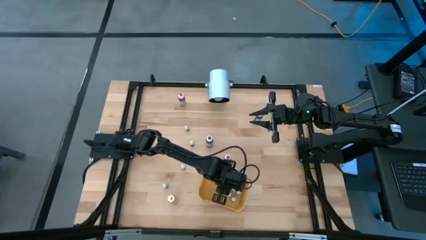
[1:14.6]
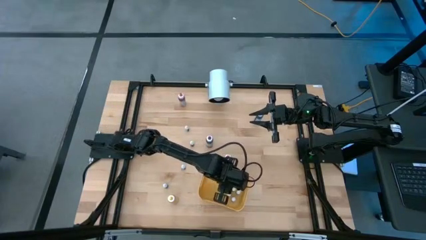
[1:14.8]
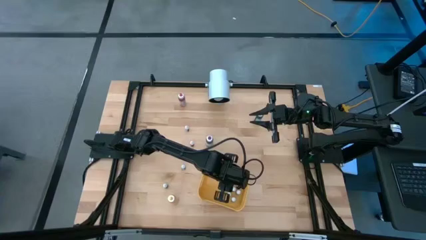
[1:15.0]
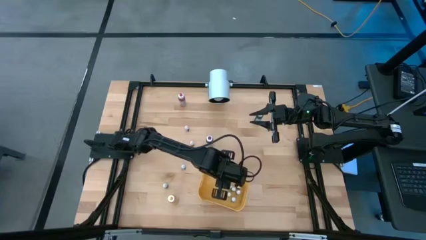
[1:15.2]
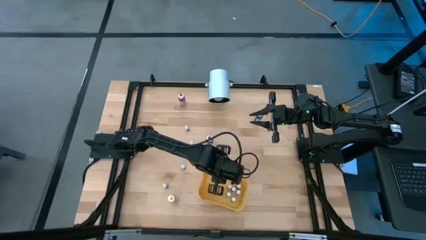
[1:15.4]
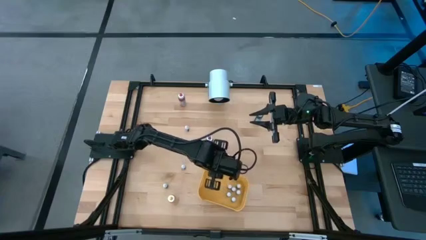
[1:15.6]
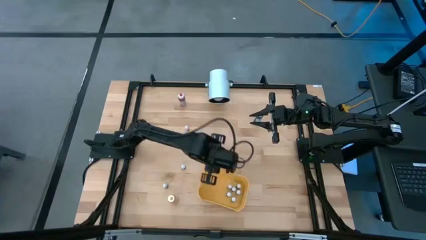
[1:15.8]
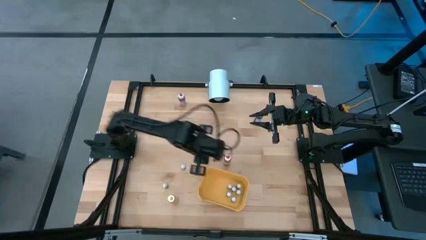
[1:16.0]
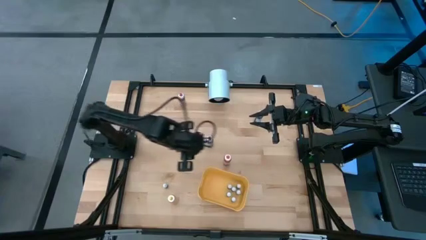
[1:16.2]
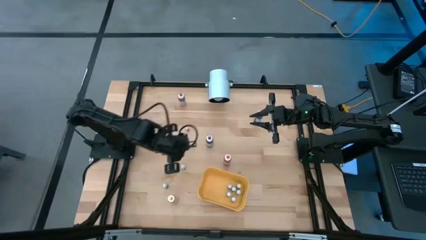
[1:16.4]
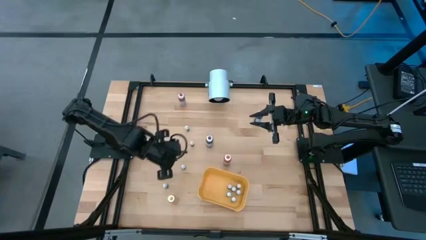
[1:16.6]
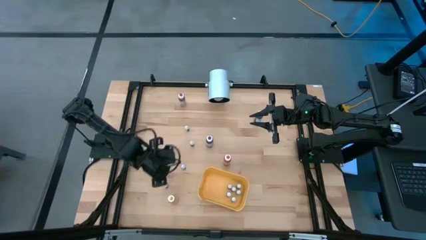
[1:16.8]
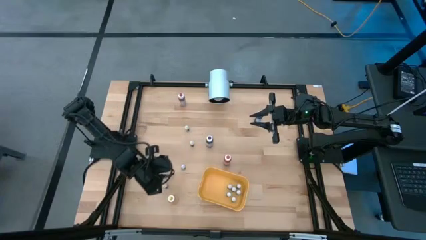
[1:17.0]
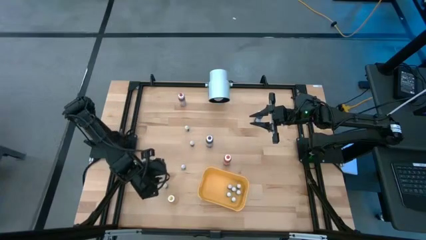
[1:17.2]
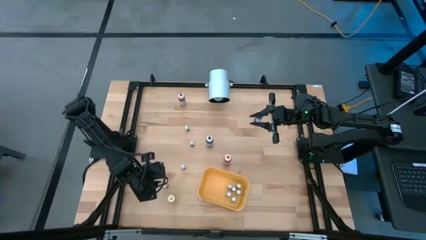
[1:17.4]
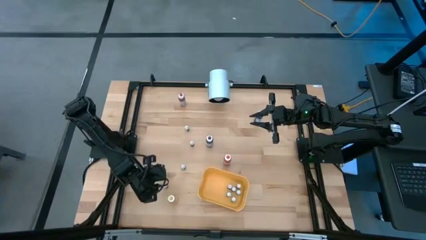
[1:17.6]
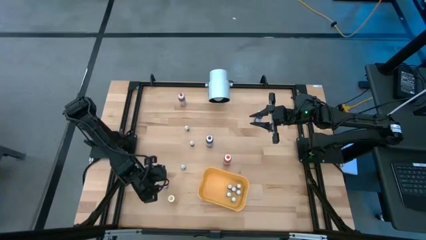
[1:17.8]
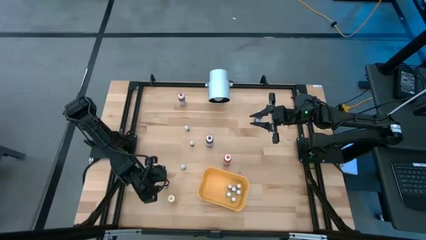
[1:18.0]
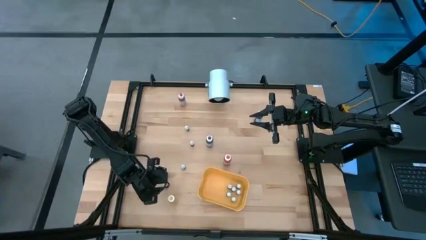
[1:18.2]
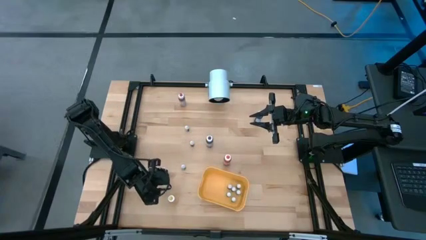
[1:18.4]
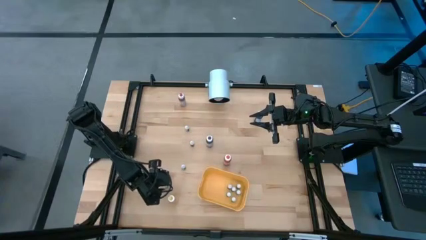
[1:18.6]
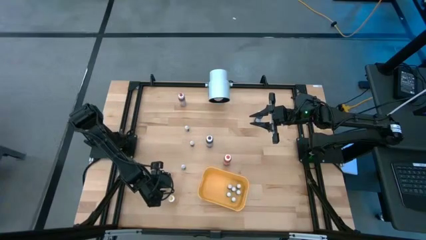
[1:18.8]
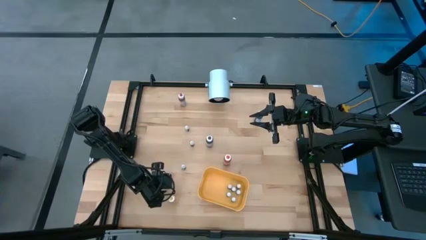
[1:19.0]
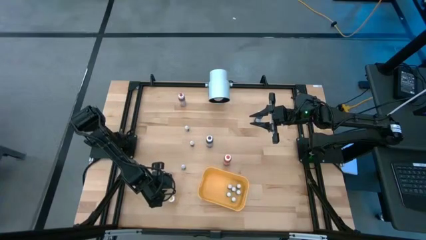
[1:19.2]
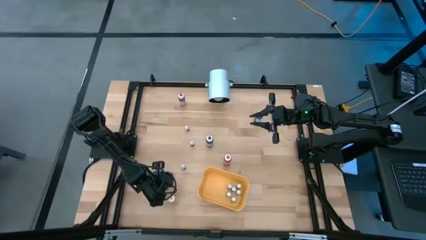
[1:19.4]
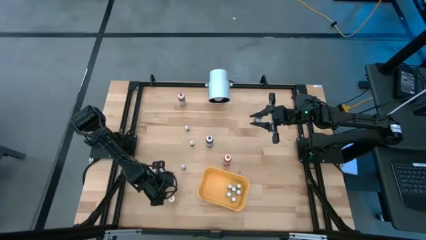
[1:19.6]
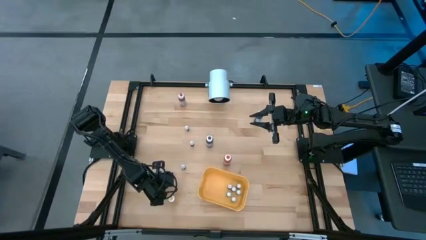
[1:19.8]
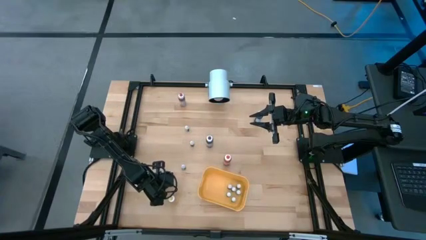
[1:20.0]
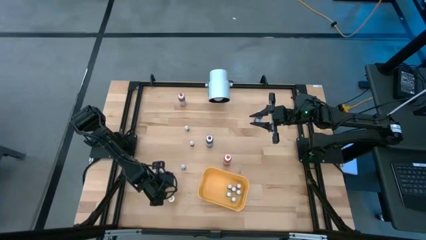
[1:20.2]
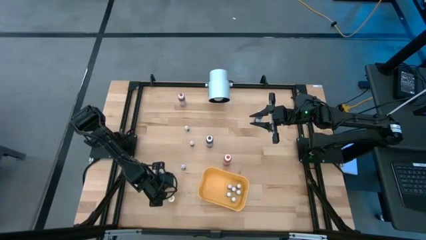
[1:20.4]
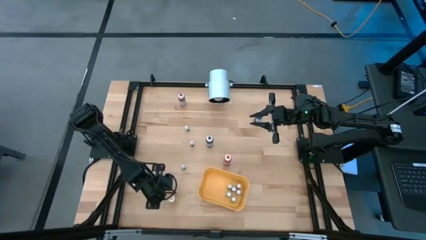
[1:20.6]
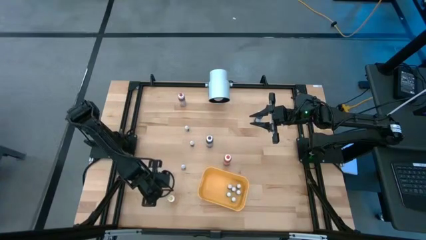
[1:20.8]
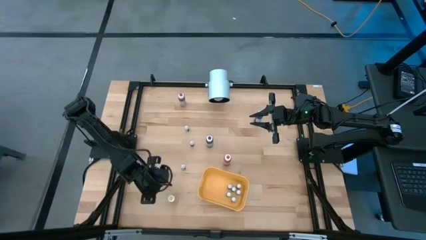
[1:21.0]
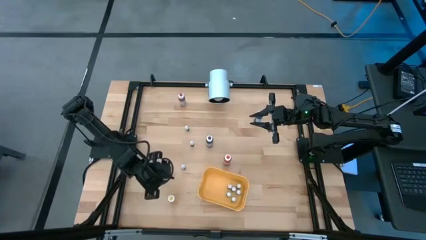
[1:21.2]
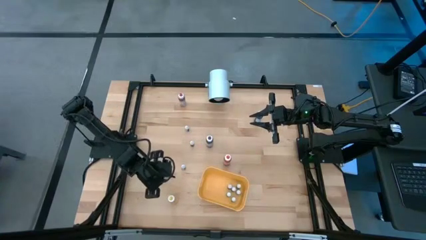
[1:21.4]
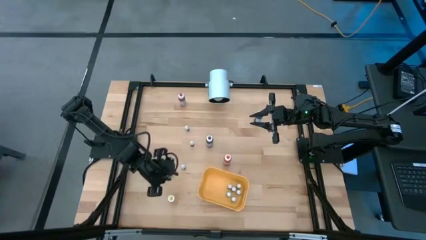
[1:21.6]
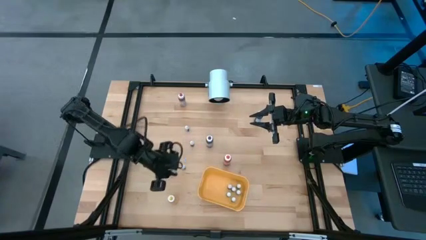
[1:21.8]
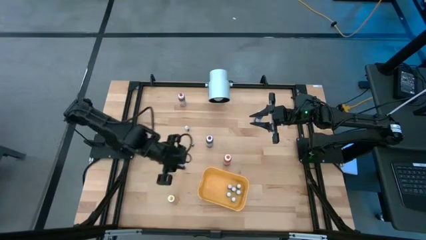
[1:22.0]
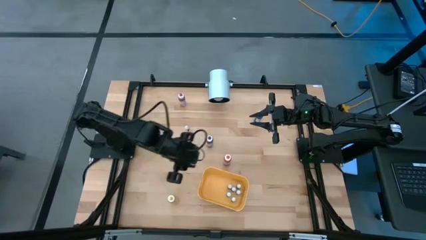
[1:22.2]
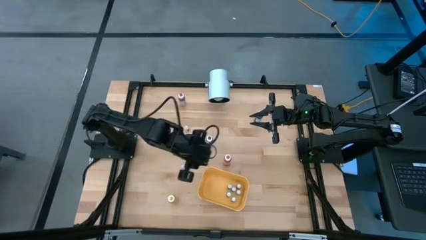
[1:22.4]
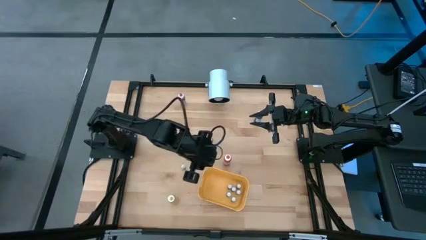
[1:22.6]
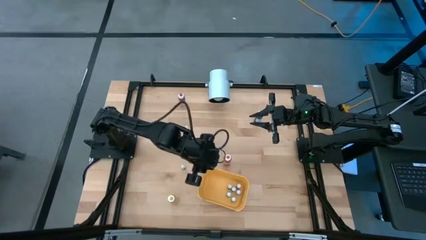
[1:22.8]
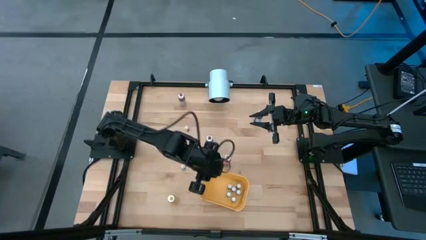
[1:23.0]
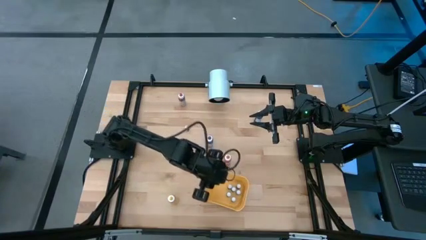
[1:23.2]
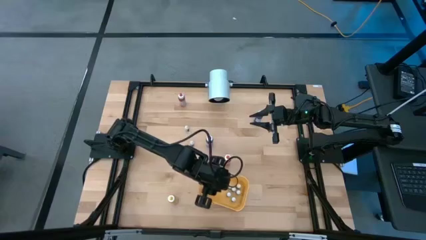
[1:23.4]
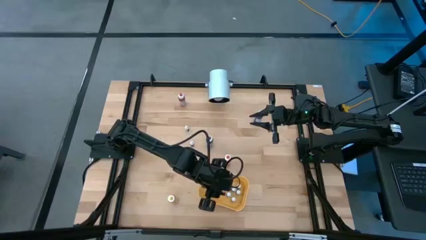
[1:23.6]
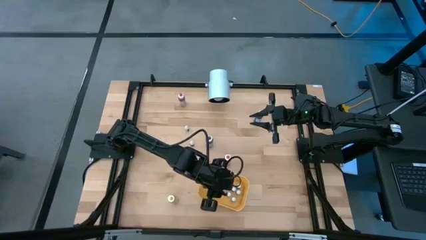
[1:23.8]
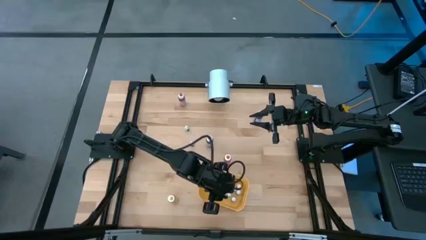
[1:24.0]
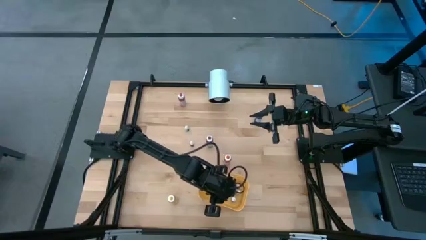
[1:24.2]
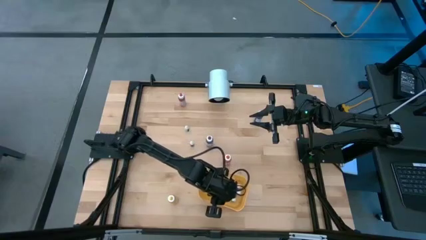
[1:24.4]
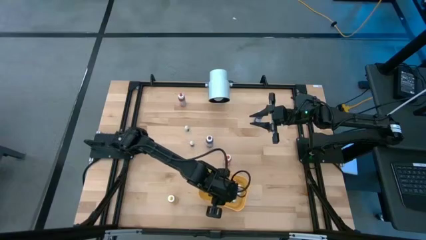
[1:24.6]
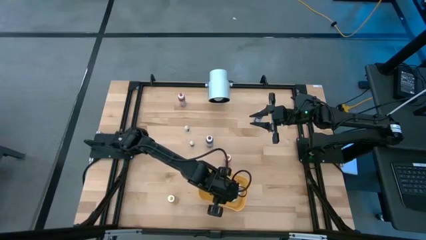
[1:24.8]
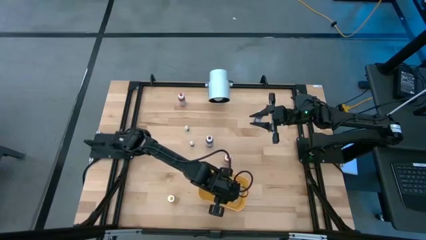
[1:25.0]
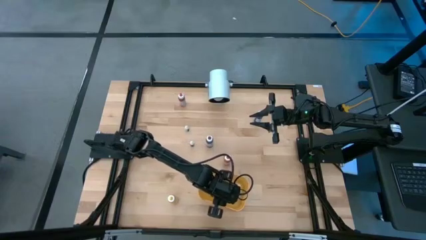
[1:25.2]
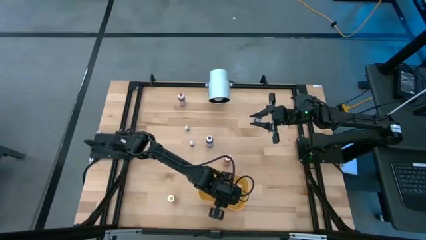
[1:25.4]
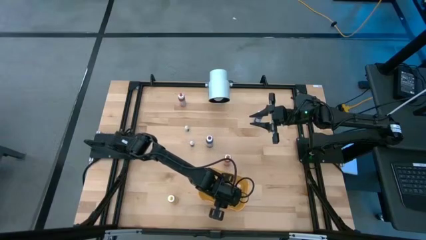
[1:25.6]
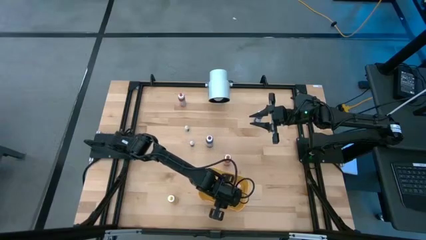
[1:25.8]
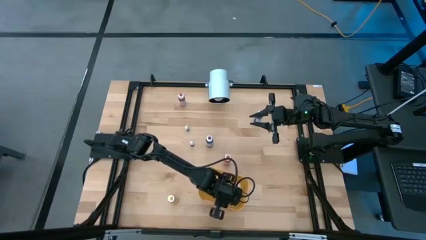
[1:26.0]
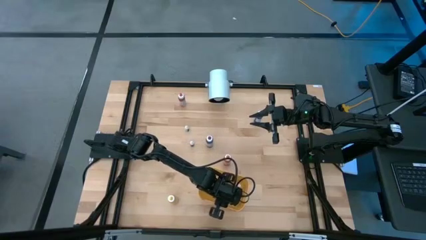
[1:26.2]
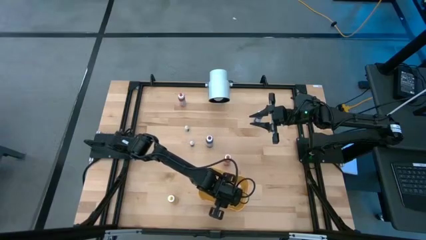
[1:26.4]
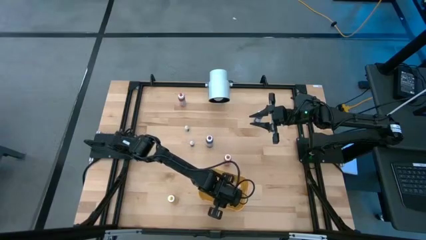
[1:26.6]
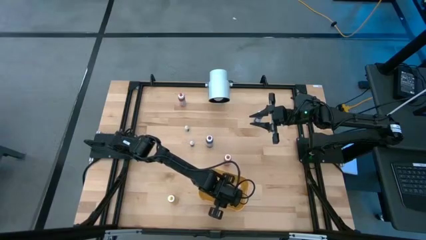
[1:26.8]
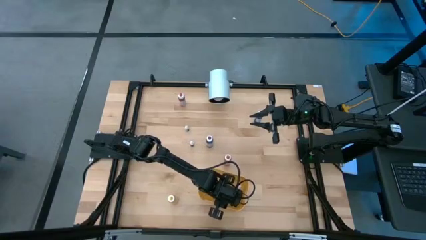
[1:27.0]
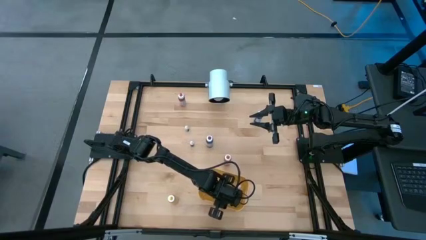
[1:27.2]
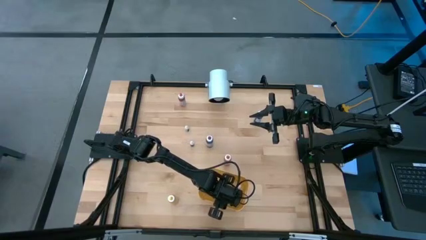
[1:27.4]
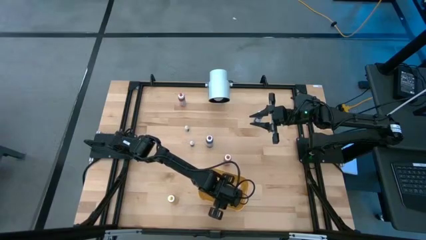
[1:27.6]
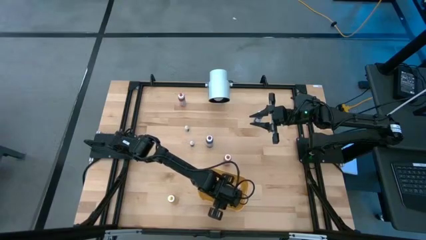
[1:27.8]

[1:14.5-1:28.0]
Task: Pick & Place food coloring
Put the small green food coloring bottle into the yellow container
